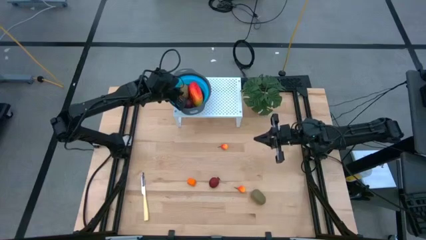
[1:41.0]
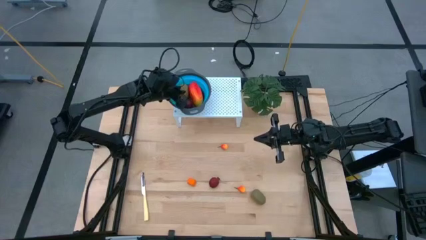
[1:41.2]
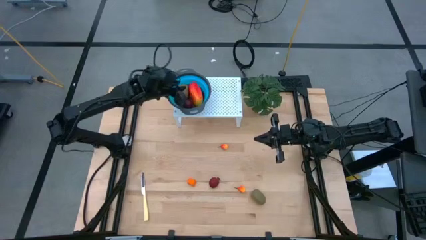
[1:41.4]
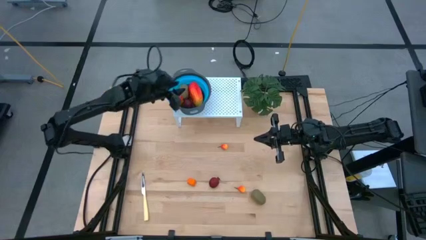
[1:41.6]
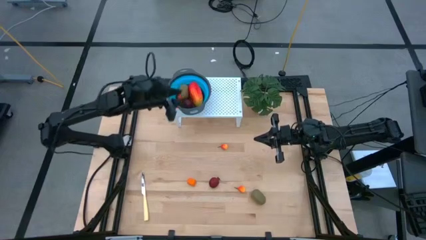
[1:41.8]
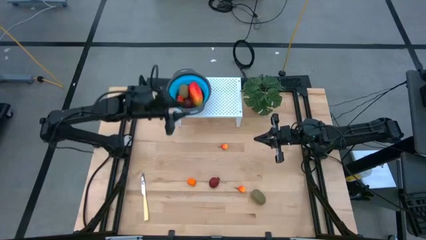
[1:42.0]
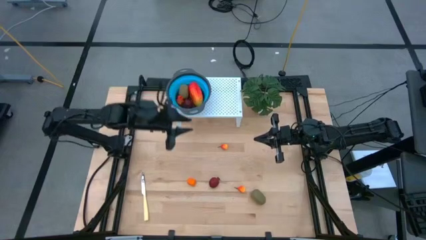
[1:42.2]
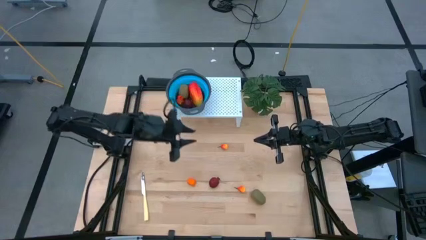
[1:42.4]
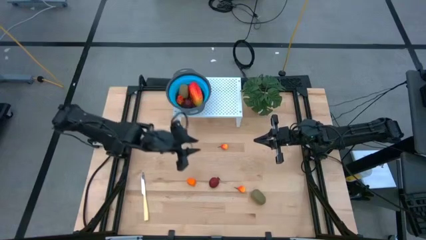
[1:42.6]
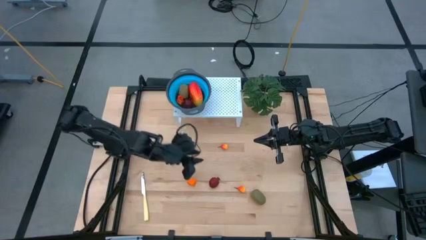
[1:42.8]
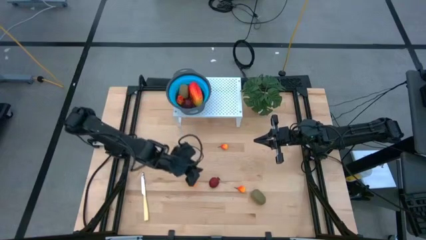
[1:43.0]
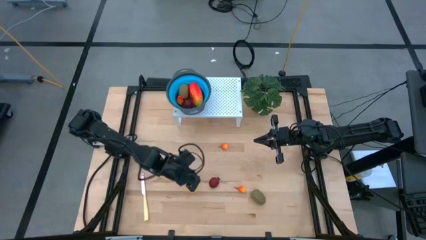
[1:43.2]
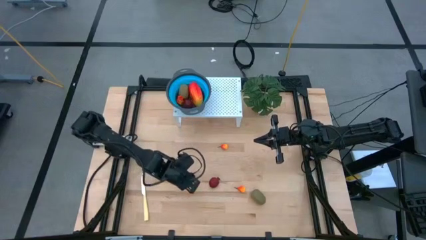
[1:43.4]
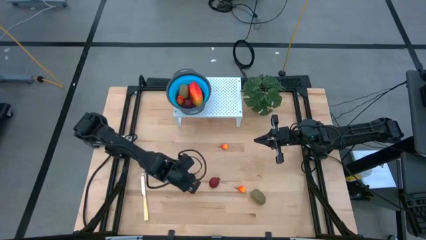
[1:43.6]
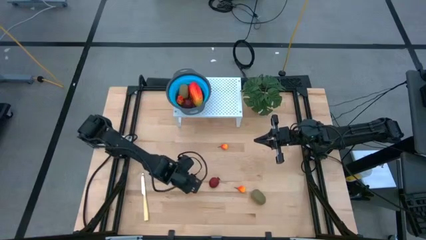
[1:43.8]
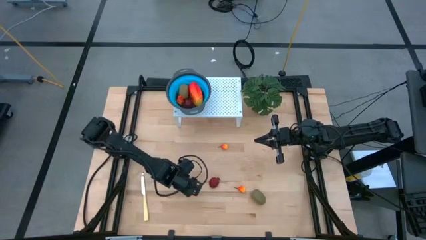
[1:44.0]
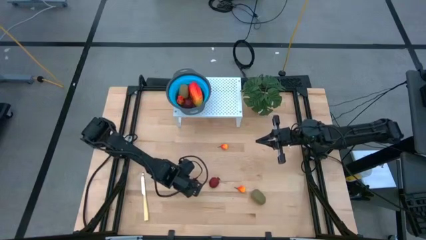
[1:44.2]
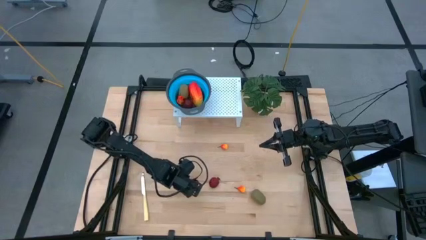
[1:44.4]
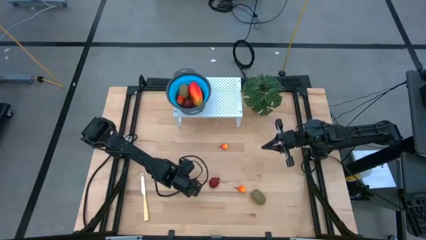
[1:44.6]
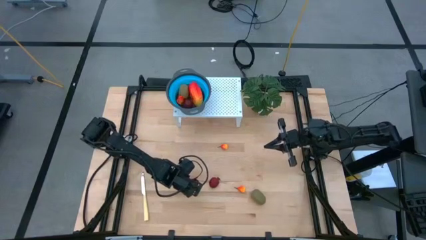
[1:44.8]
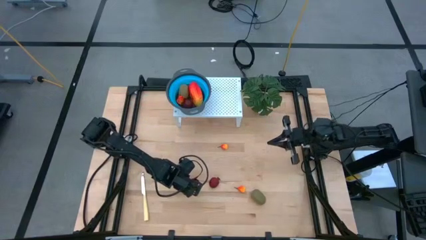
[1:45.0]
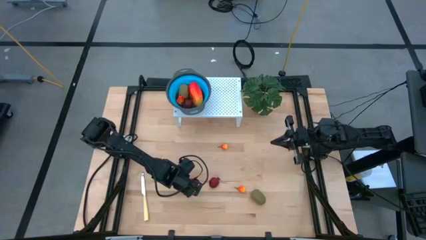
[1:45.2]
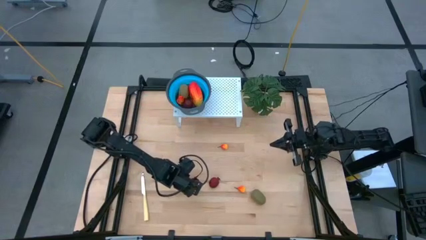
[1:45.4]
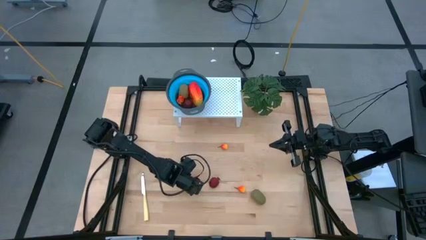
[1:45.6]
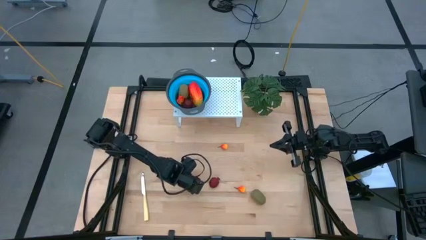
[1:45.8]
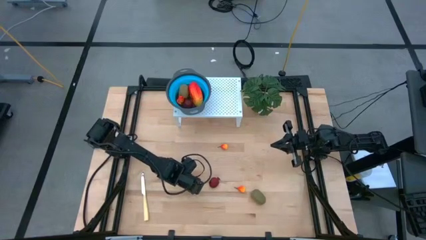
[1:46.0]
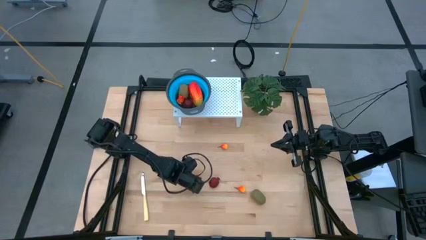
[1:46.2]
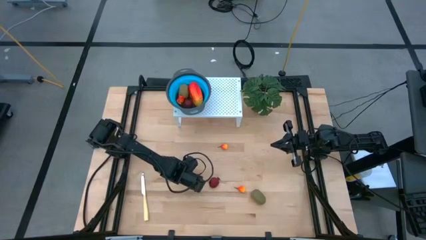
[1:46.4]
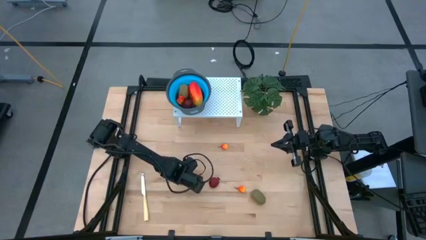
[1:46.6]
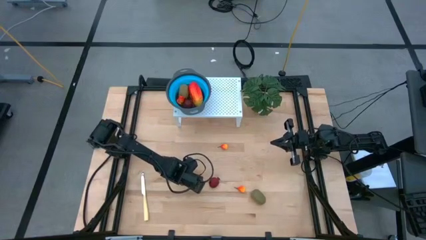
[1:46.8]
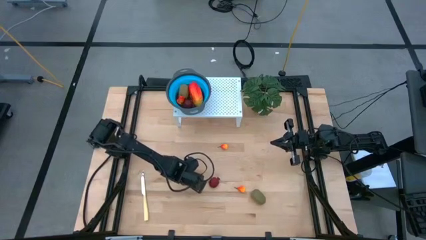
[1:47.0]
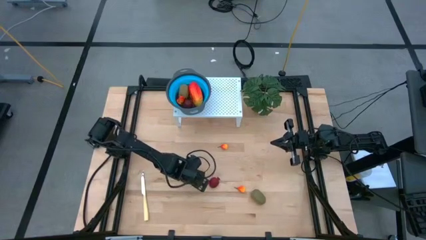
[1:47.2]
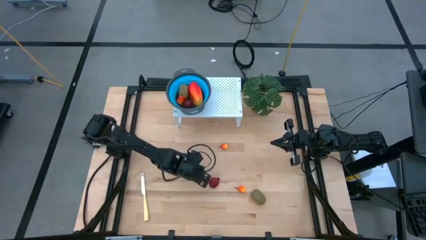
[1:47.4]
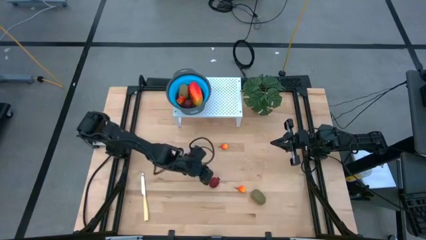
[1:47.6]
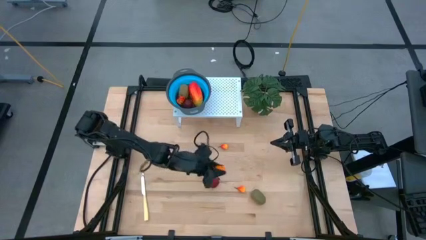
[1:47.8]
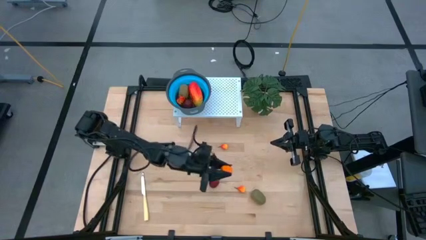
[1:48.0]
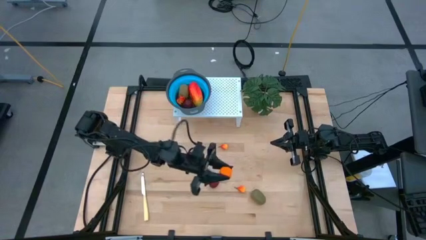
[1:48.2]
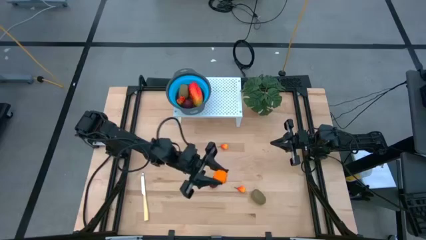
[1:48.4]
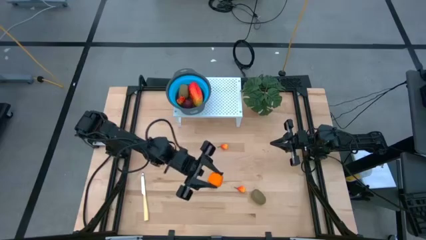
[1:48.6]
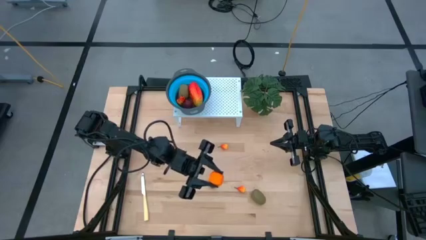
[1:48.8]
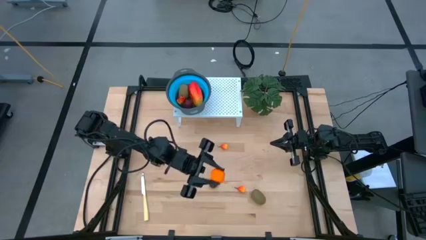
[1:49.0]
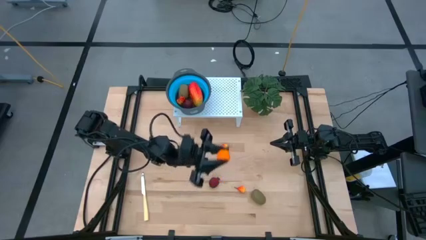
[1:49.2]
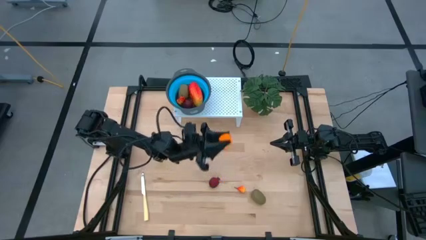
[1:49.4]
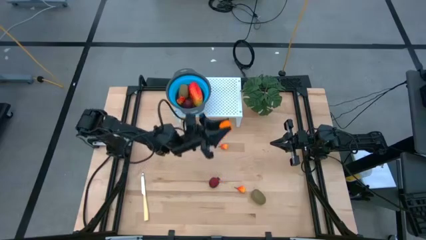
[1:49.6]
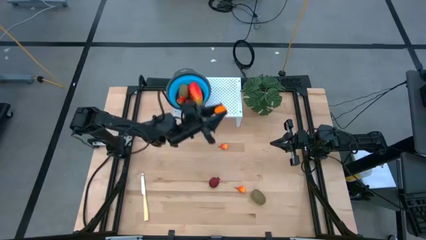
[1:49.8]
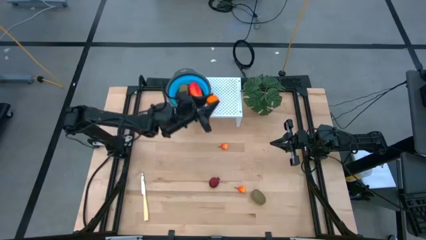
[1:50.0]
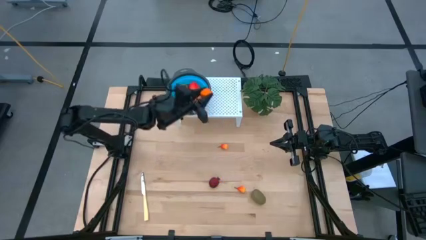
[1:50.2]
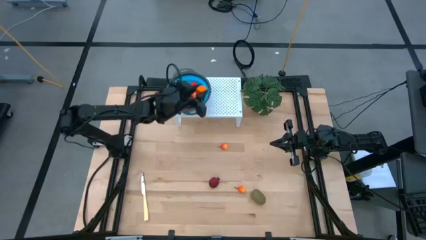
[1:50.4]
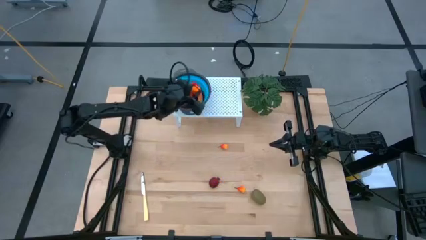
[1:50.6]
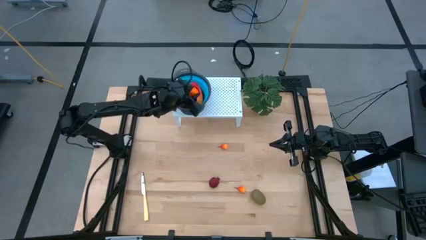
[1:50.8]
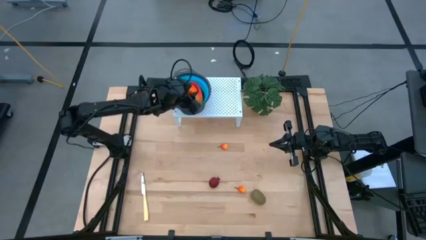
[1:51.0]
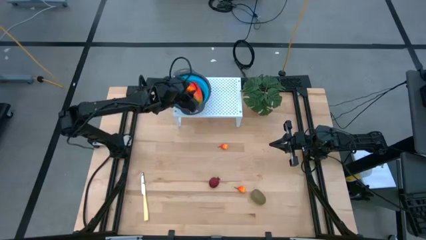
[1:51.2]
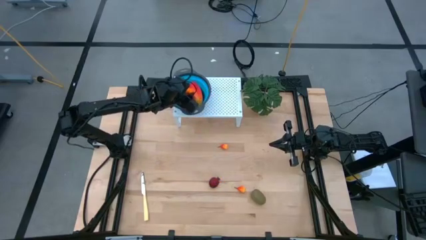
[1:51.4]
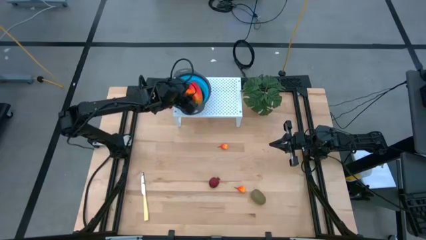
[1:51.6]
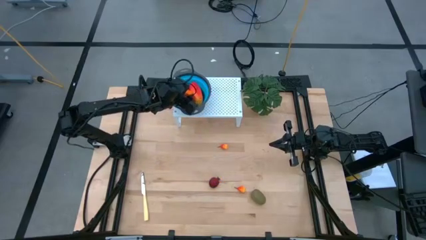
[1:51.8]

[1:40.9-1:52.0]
Task: Pick & Place Fruit
Put the orange in the blue strainer bowl on the shelf

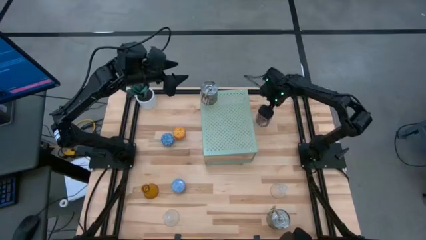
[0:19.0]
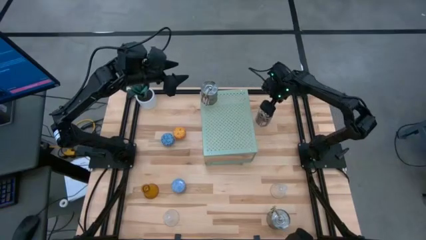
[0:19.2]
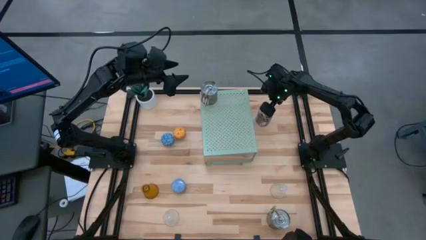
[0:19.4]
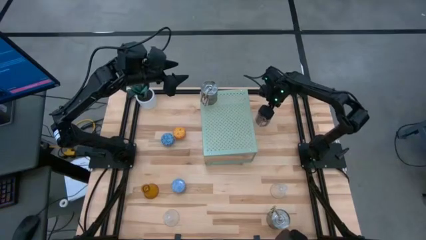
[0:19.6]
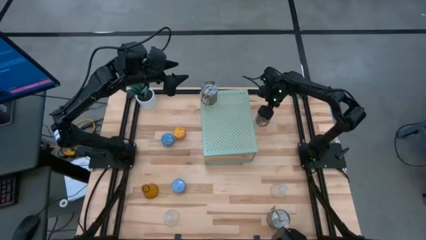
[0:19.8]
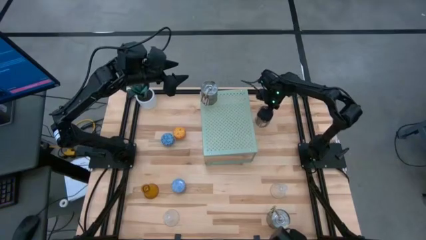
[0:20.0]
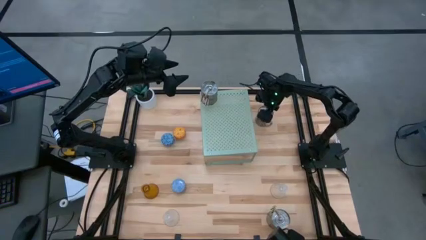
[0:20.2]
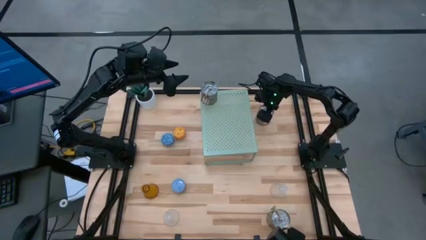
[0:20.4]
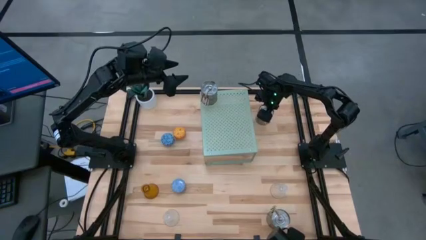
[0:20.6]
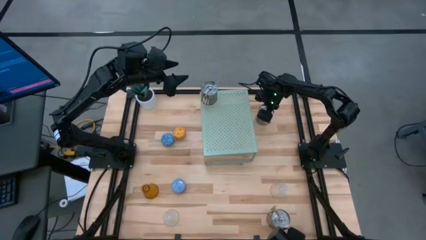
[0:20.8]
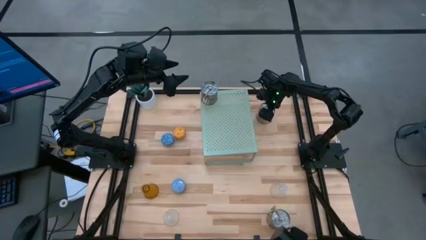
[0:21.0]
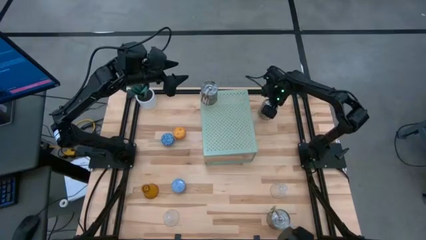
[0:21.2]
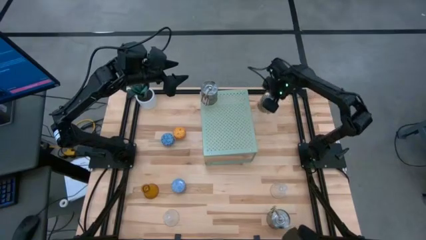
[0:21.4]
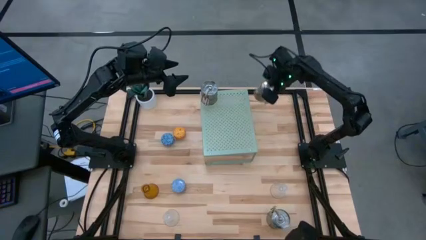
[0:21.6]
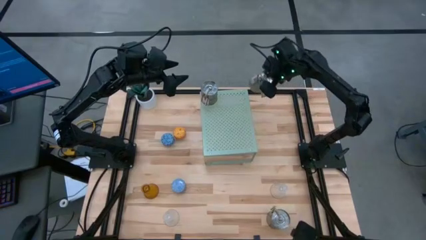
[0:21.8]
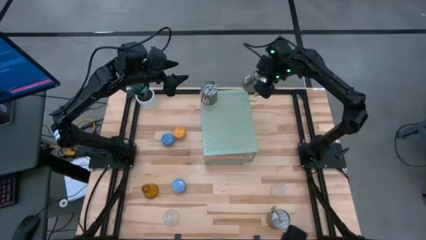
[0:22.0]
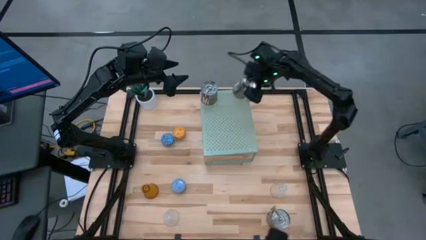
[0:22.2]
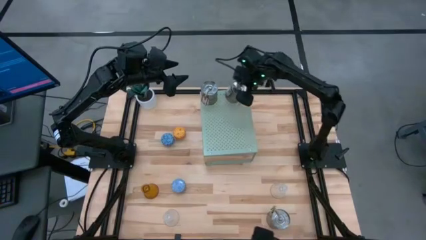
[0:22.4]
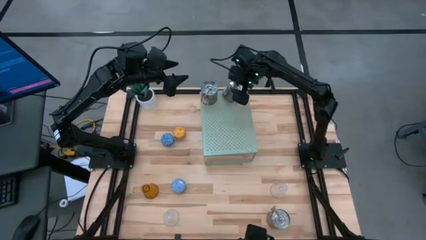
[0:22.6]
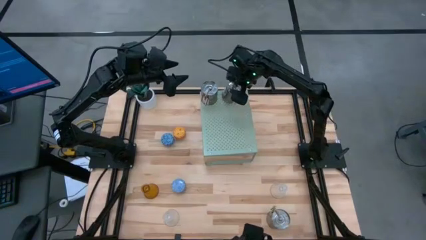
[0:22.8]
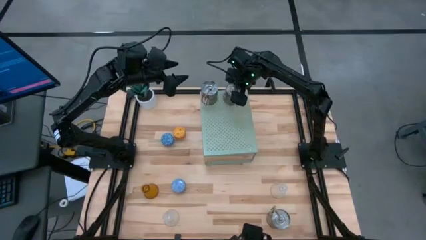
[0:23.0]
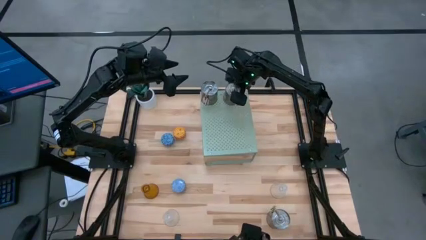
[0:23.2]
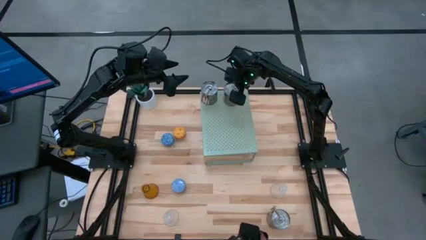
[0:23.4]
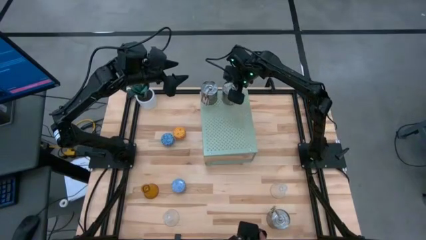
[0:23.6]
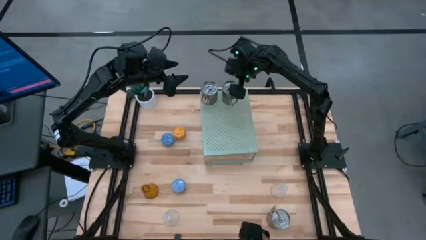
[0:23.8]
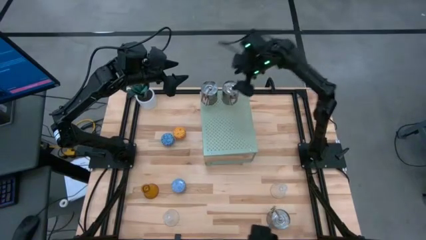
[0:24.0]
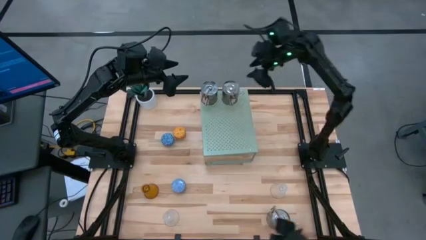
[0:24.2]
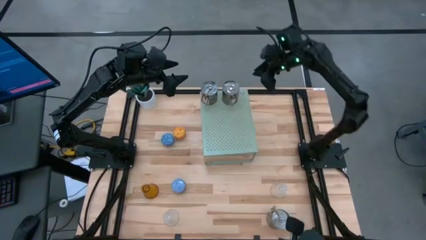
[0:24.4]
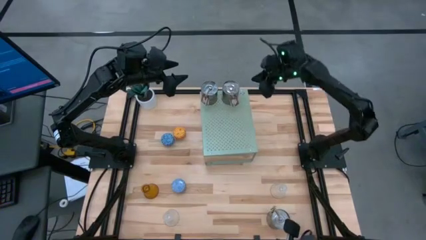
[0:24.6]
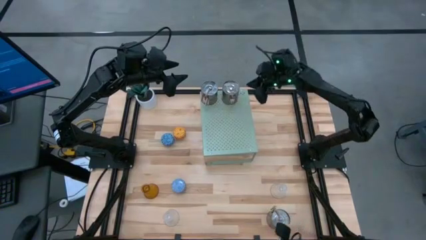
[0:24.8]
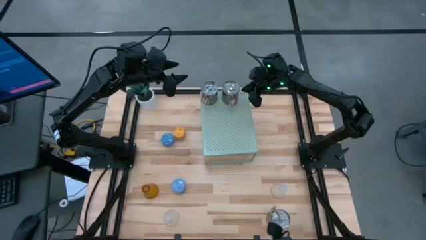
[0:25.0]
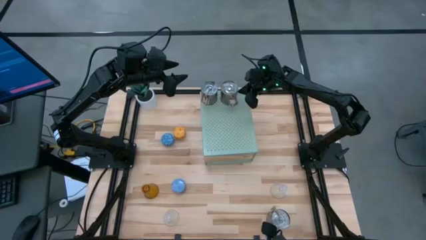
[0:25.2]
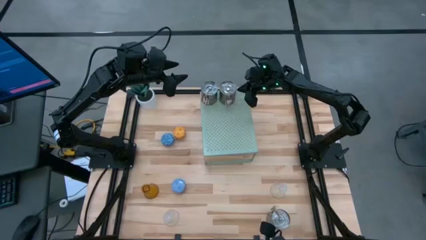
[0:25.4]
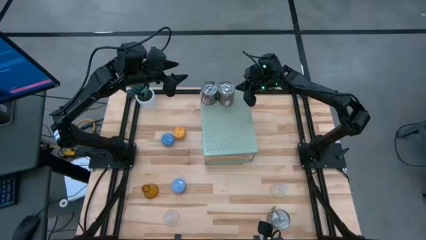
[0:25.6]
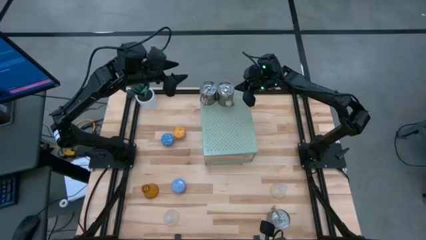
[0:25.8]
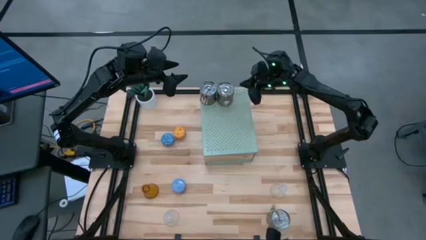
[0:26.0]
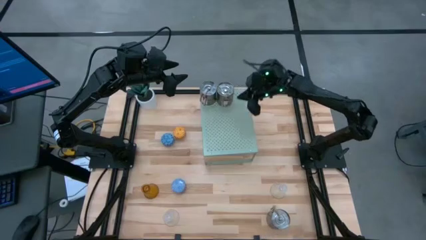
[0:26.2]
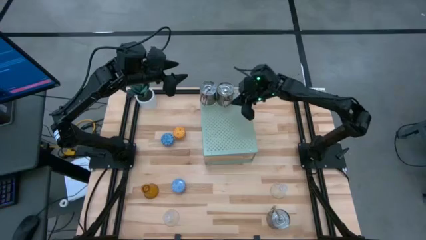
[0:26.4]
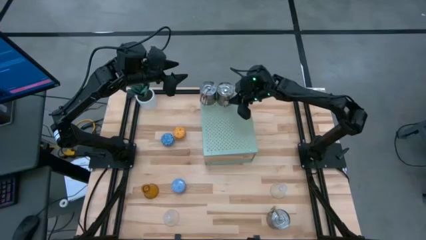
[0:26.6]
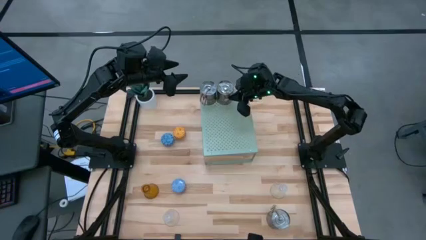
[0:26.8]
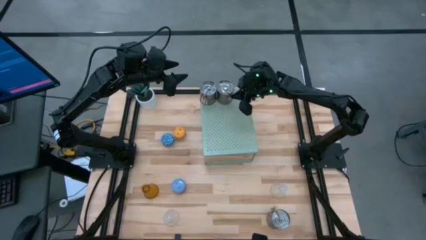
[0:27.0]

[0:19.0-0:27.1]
Task: Pick & Place candle stick holders
Put the top silver scented candle on the shelf
